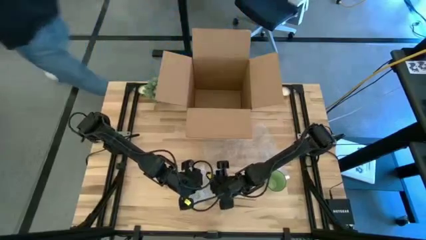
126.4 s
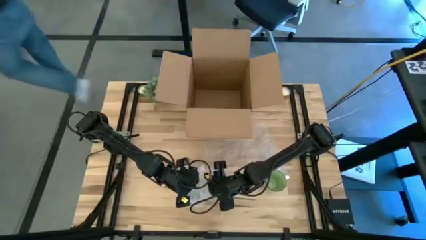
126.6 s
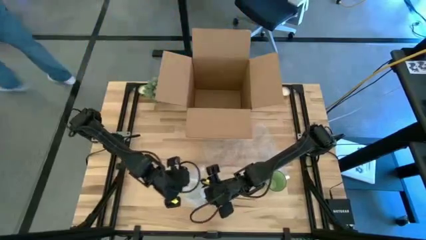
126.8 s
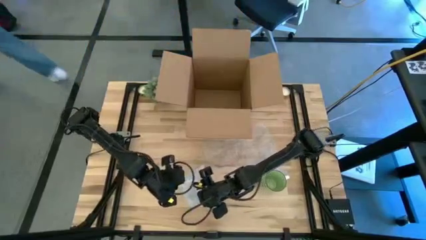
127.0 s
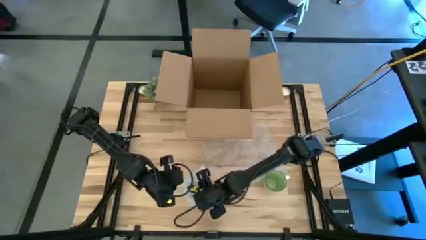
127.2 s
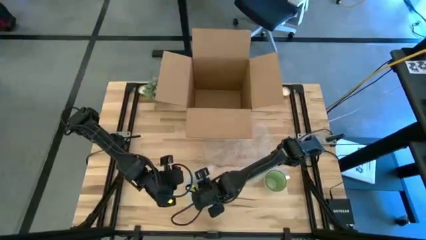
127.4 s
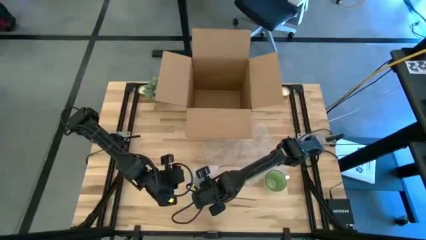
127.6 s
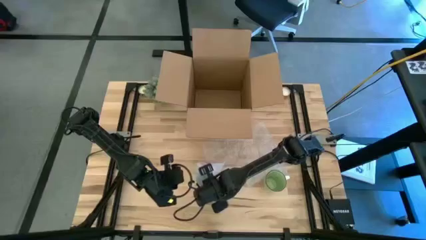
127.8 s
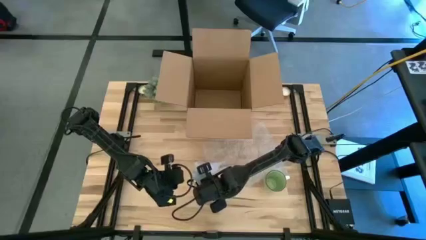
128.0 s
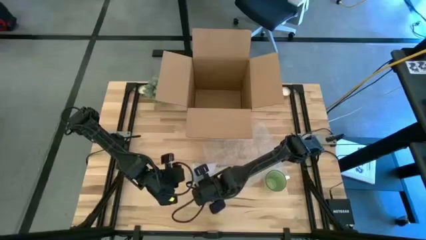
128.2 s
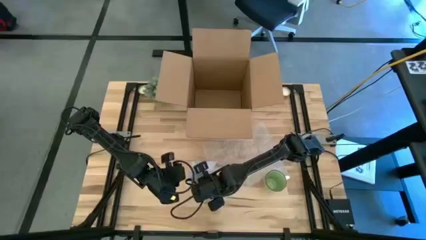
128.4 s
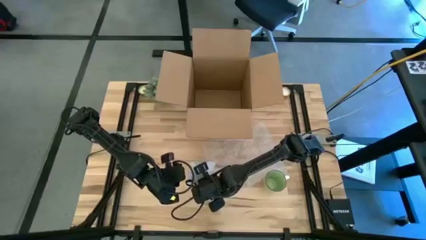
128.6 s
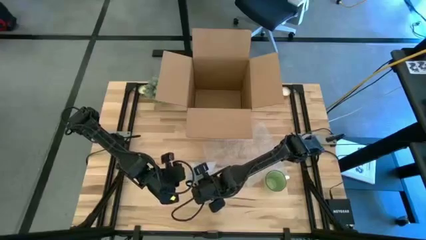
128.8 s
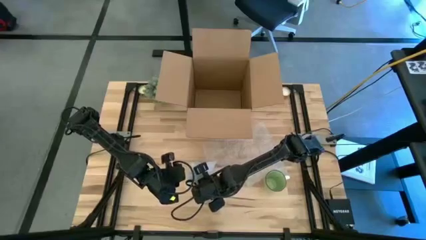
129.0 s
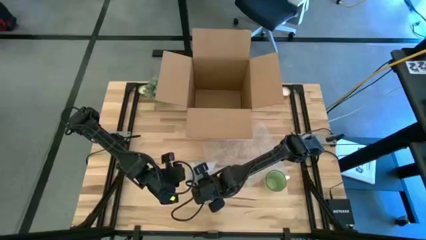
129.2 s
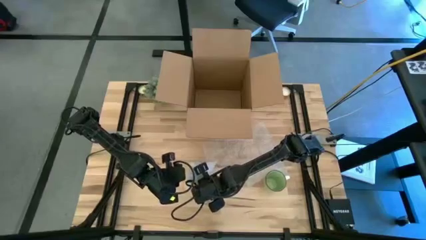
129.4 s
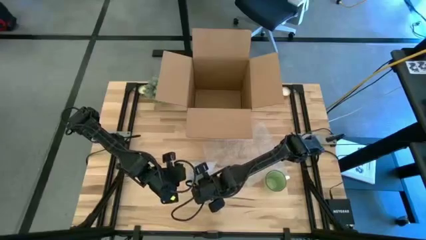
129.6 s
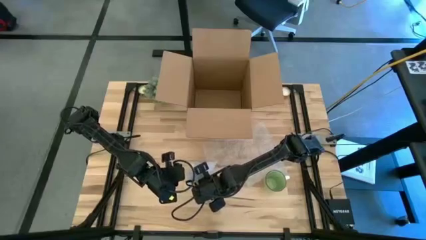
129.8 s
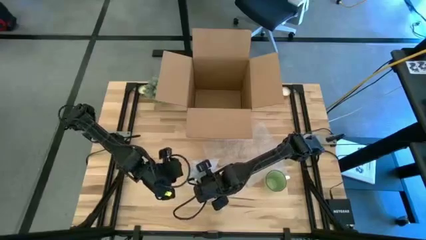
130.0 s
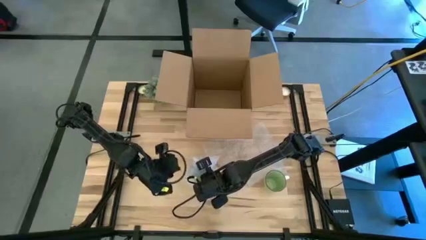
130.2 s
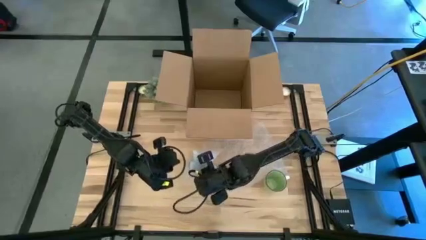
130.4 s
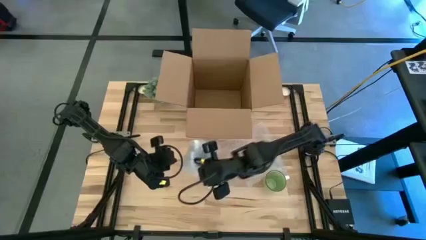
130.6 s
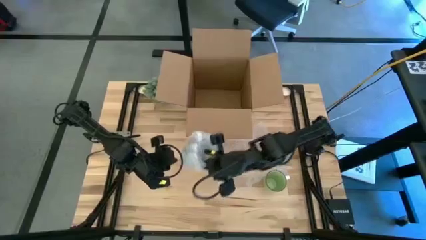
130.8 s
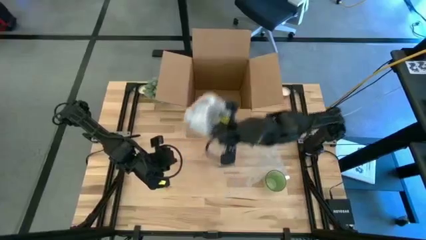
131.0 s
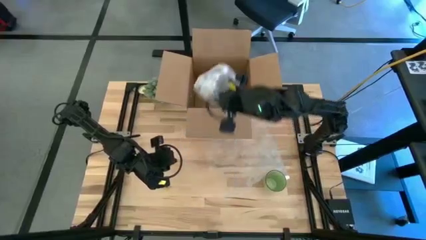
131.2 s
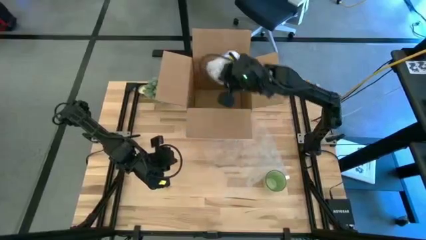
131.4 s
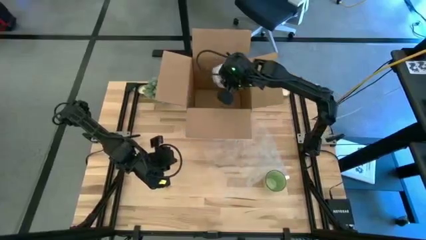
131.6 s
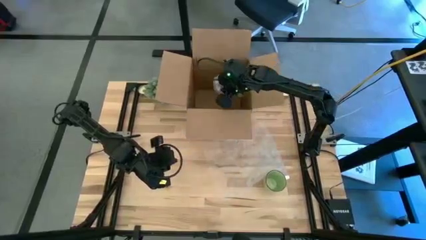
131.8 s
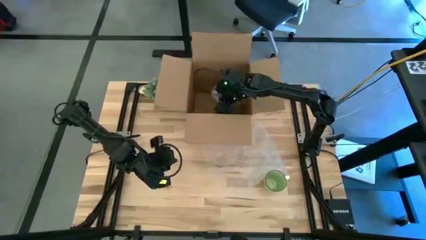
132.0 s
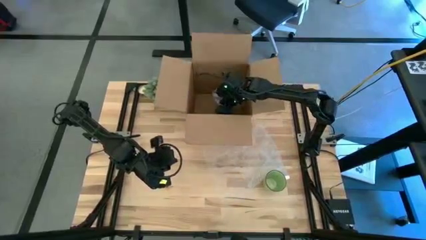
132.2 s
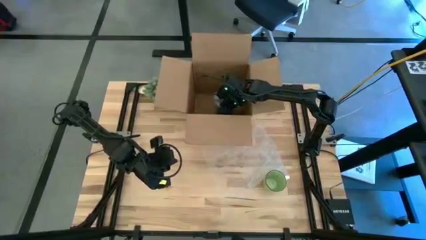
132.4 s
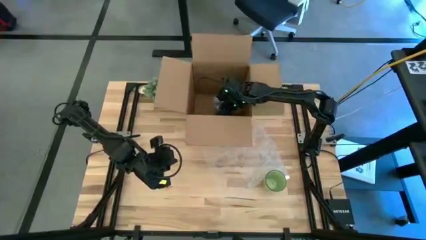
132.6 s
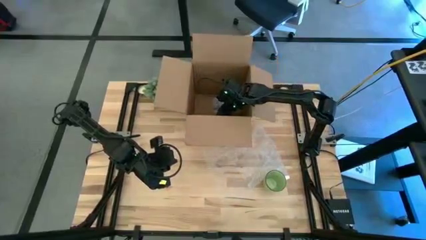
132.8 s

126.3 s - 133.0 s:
Task: wrap mug
Put the wrapped white mug into the box

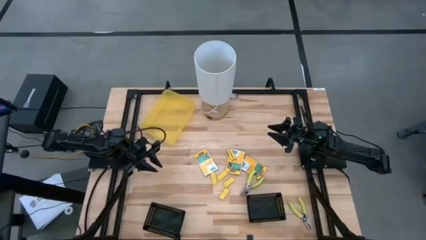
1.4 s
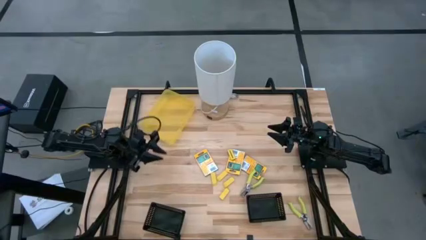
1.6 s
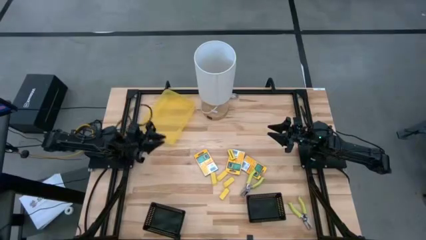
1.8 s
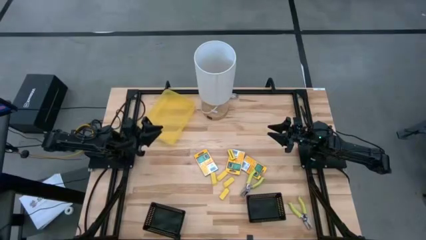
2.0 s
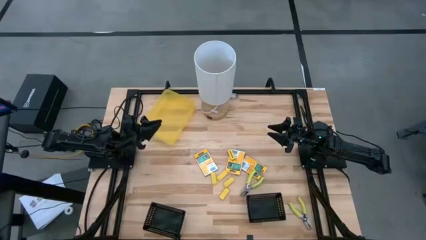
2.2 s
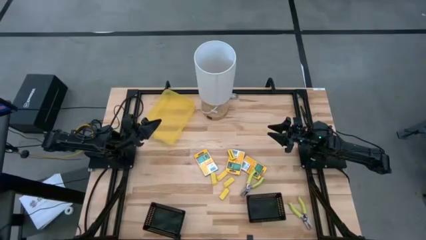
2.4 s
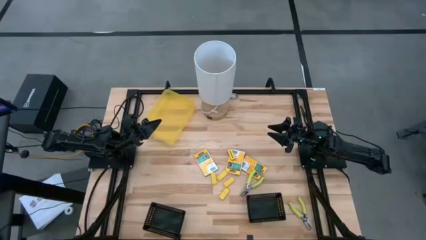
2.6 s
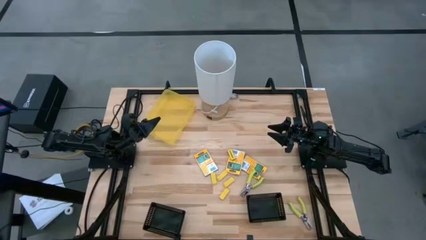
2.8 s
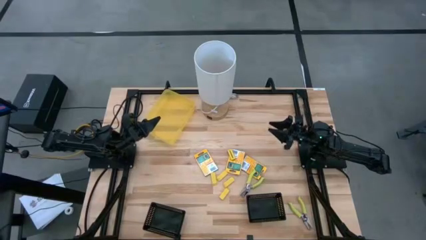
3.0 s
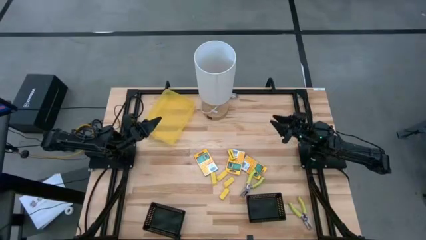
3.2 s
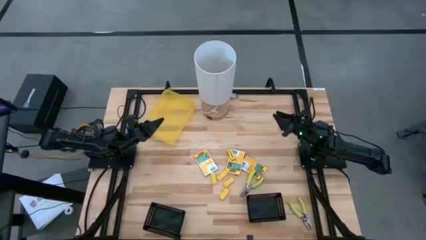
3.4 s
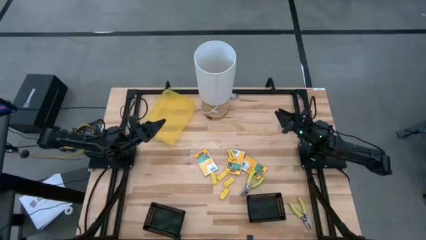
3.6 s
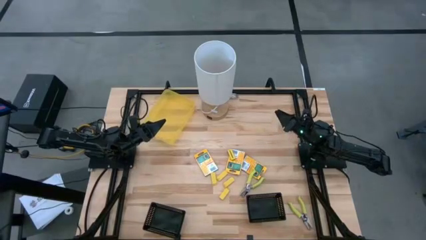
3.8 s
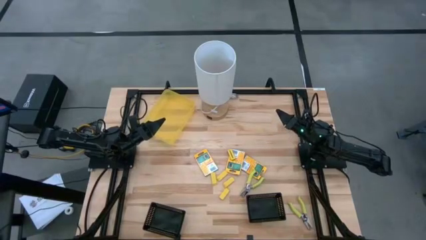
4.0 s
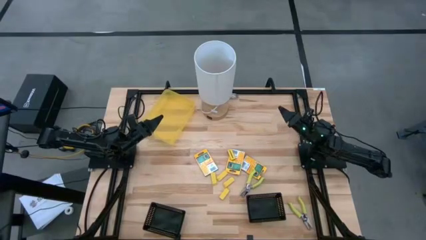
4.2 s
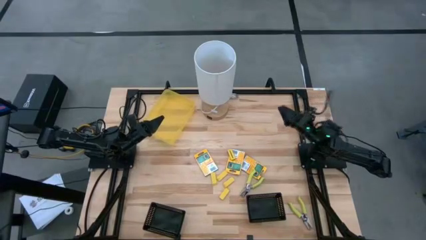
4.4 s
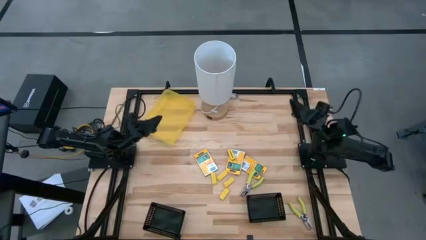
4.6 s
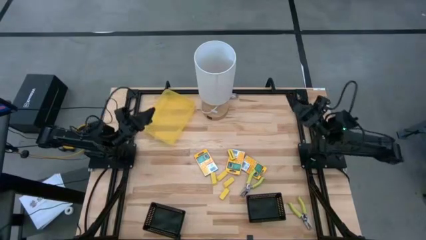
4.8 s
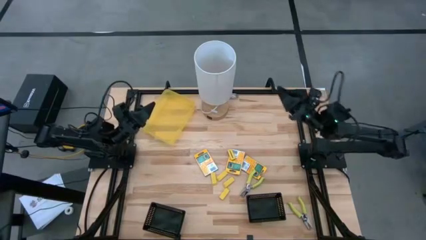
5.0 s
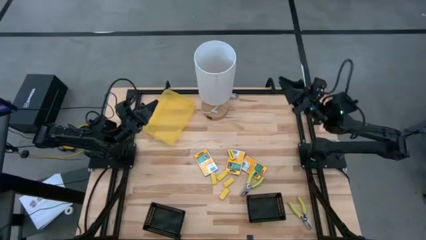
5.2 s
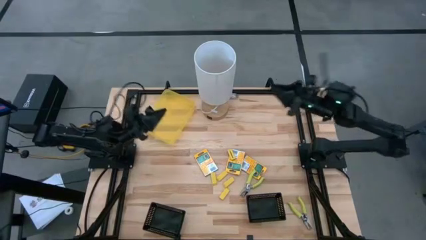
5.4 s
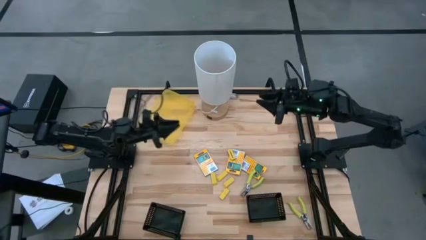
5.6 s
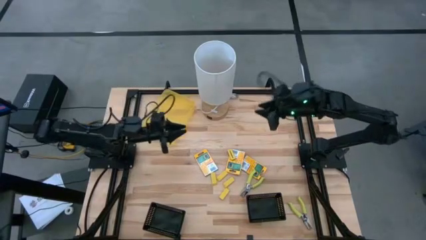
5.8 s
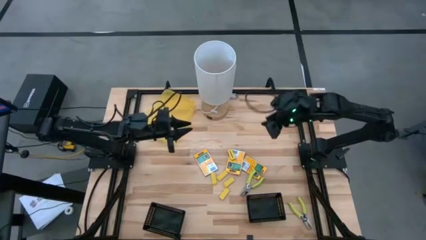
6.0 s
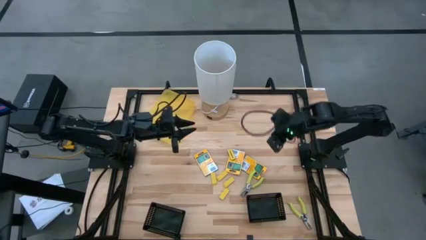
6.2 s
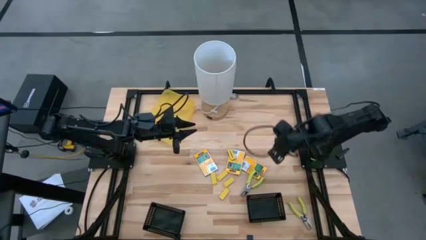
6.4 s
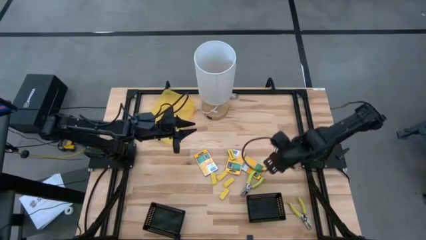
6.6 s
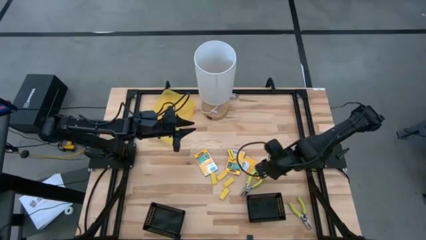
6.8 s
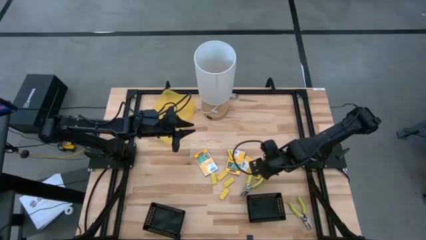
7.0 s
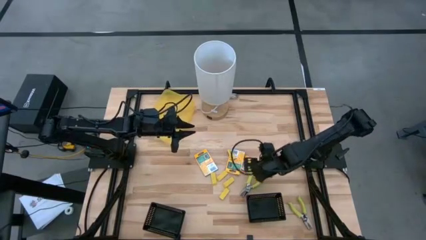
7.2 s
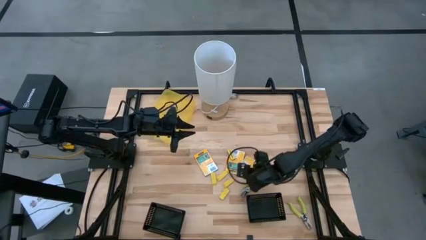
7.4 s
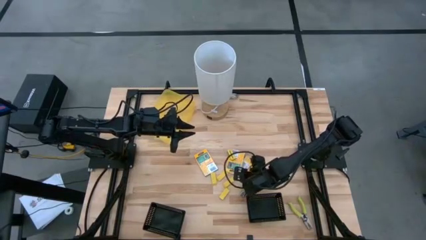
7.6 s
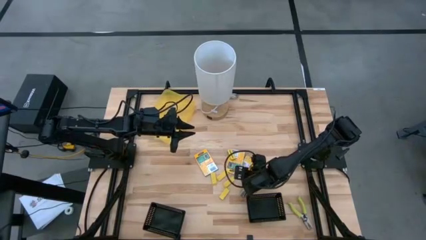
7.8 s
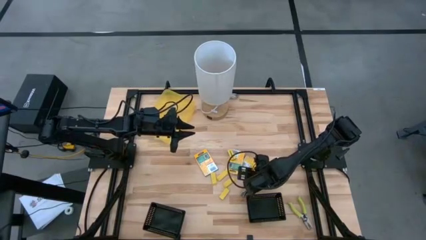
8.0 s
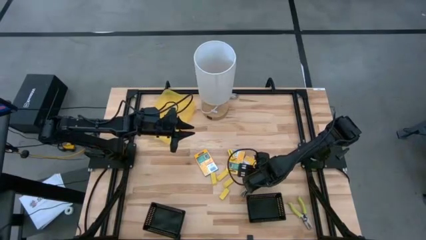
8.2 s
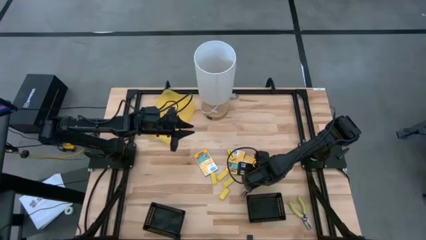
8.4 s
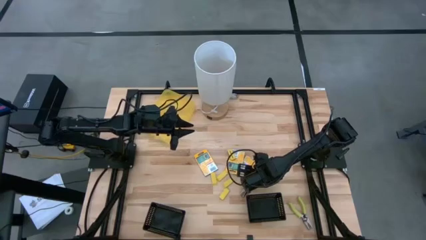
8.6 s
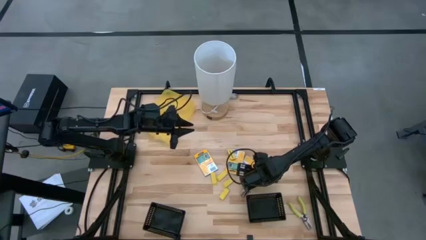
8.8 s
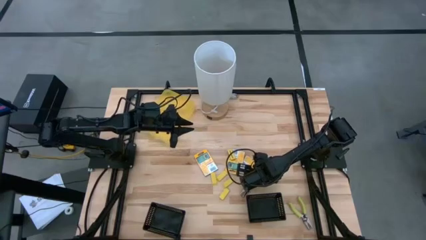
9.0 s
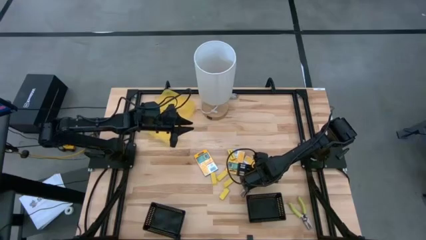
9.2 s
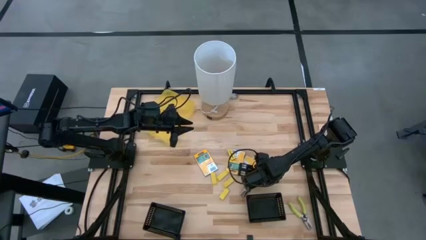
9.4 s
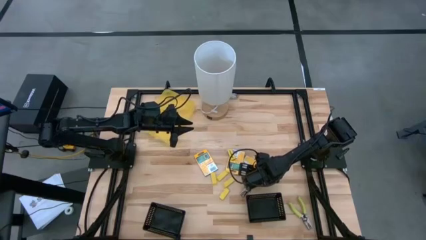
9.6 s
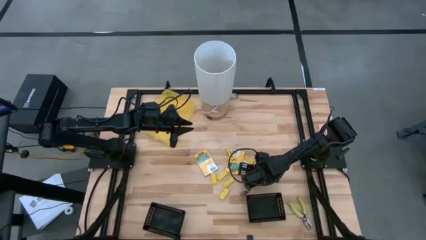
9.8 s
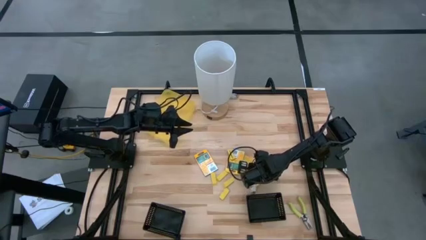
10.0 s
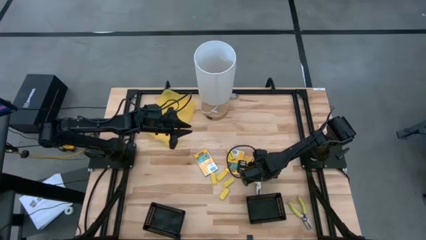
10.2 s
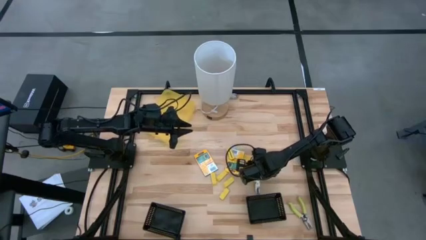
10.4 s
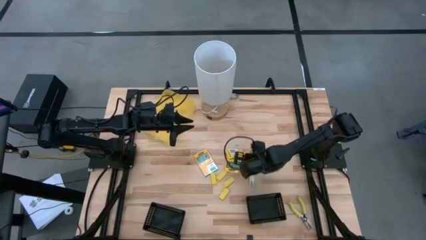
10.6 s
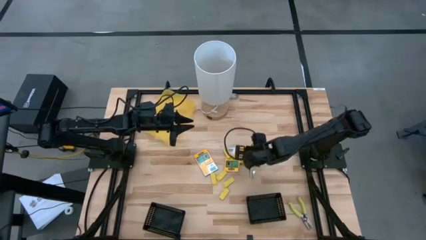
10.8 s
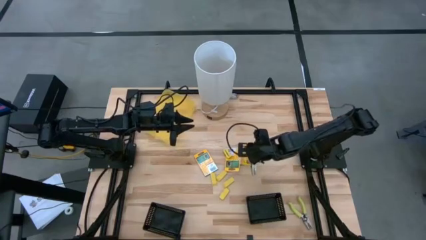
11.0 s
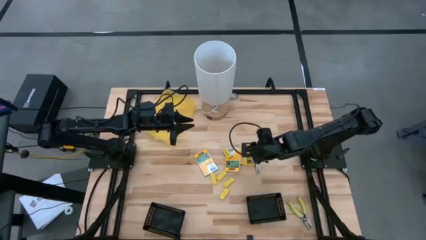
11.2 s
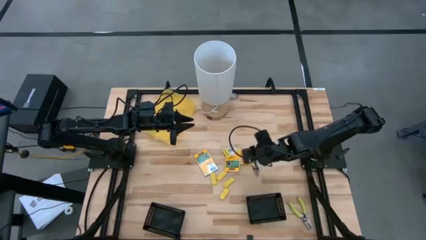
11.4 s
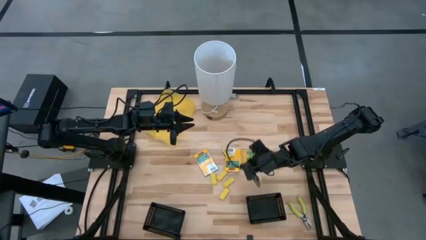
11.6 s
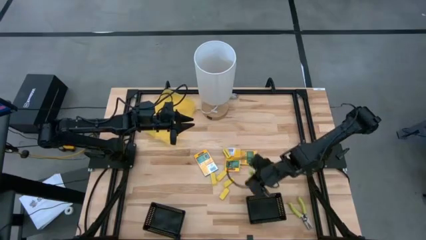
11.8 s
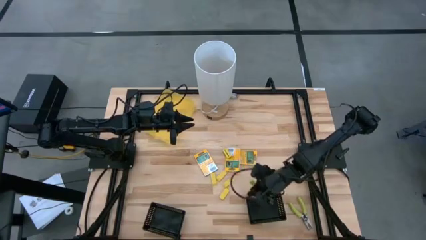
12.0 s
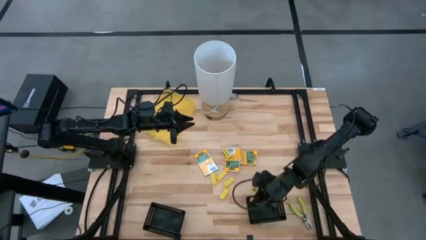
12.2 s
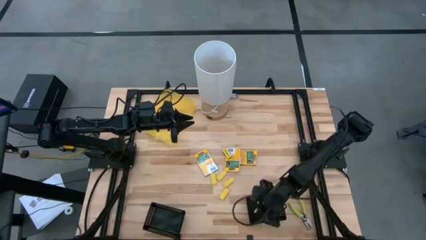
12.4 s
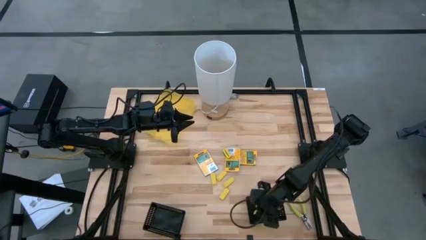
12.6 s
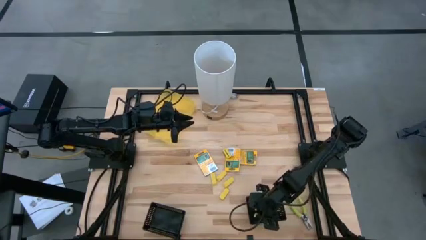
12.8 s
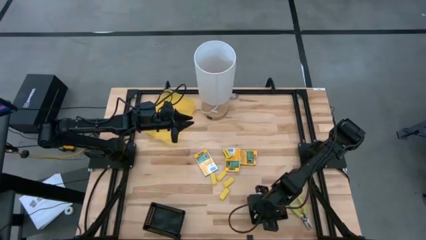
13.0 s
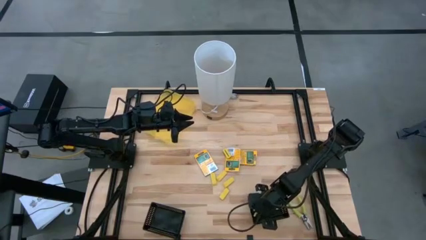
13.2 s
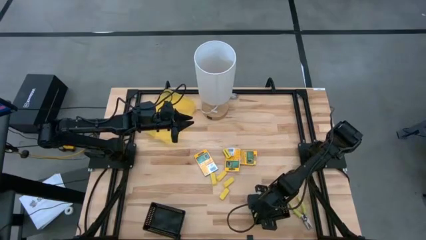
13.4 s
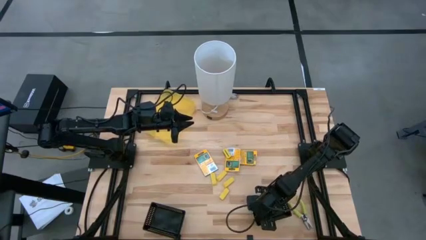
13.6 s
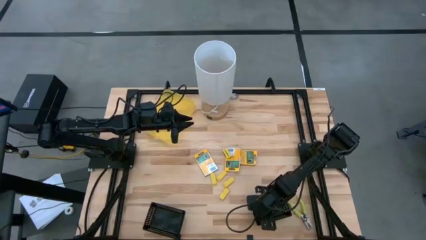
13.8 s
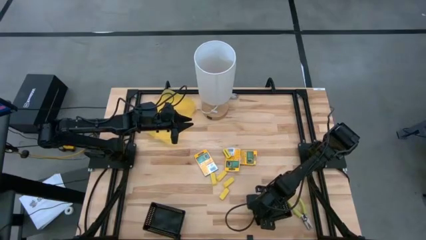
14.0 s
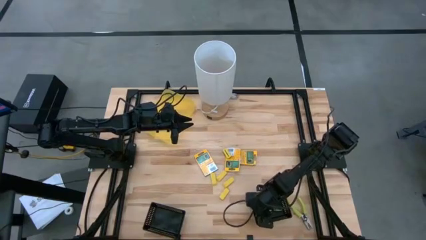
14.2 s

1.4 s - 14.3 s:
Task: Pick & Place School Supplies
Put the punch pliers into the bottom right black bin
